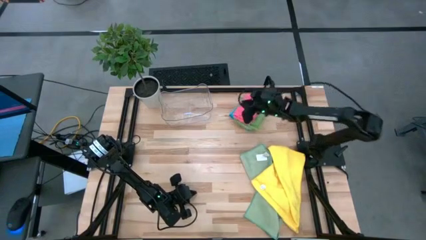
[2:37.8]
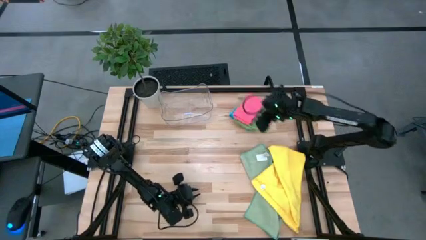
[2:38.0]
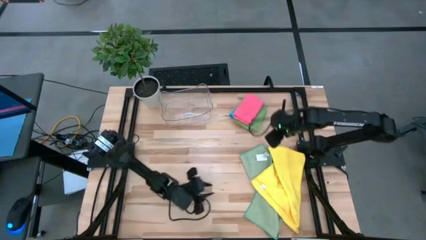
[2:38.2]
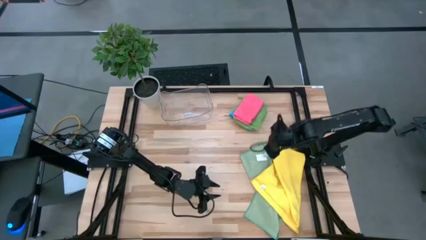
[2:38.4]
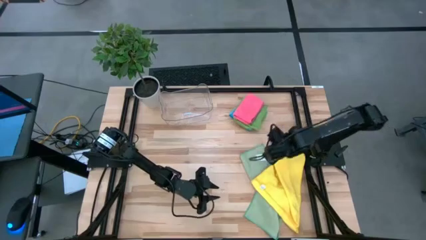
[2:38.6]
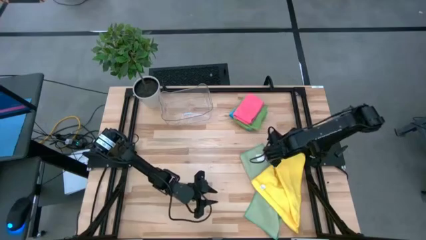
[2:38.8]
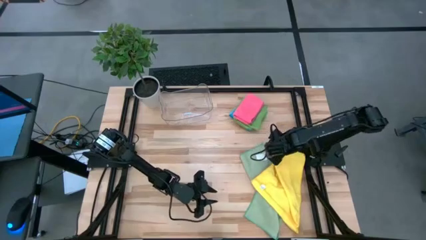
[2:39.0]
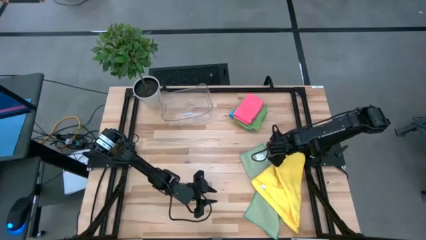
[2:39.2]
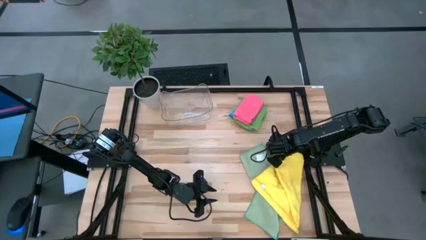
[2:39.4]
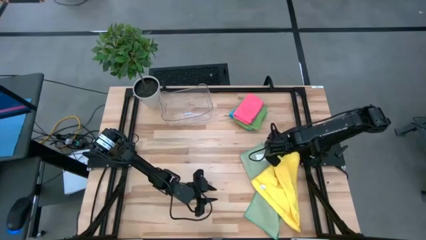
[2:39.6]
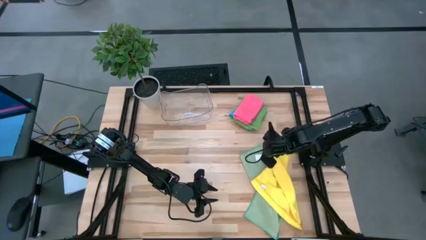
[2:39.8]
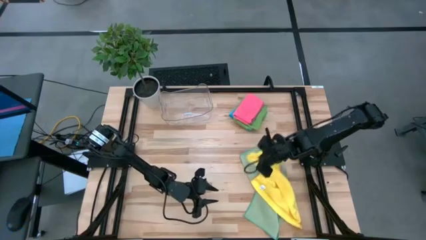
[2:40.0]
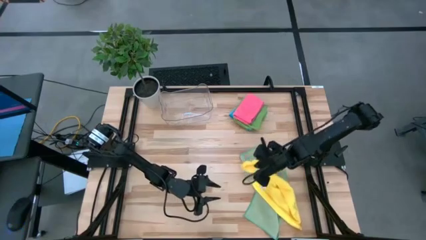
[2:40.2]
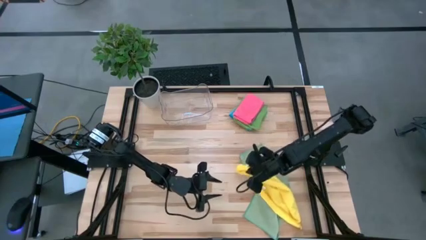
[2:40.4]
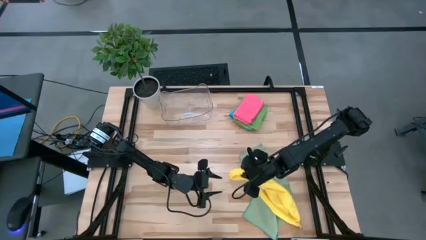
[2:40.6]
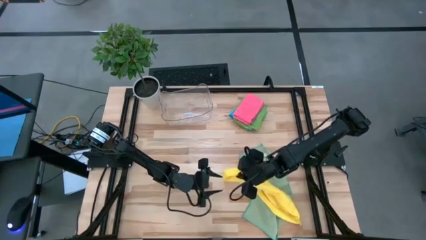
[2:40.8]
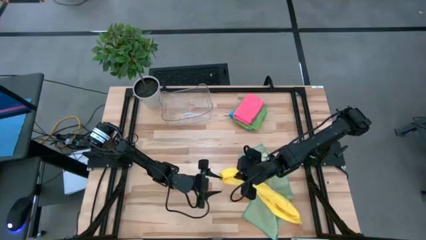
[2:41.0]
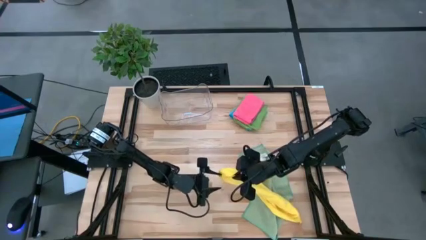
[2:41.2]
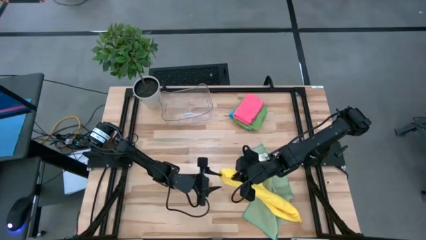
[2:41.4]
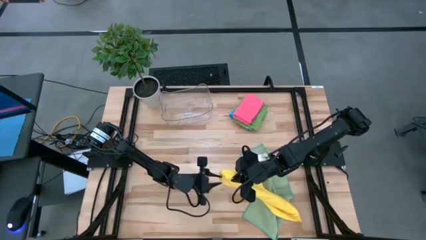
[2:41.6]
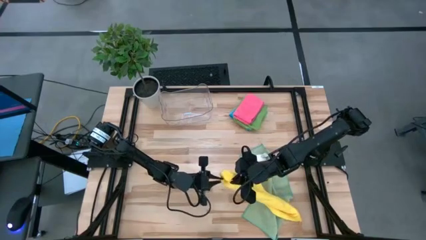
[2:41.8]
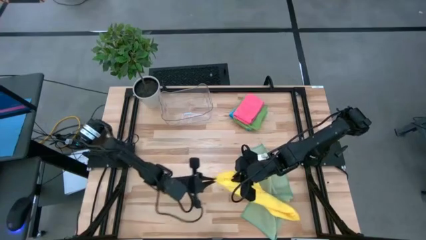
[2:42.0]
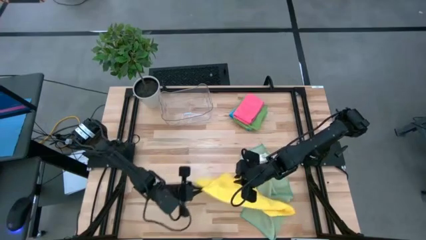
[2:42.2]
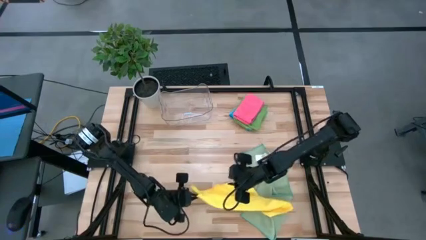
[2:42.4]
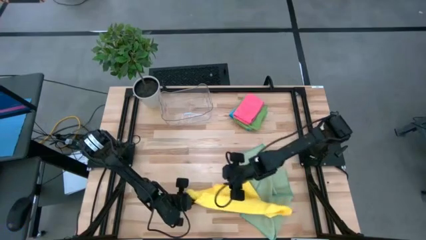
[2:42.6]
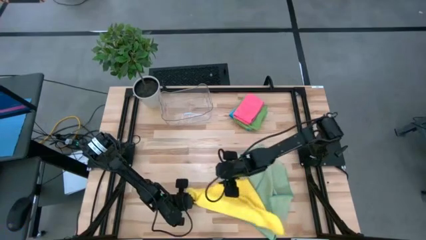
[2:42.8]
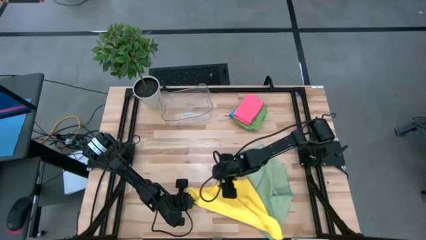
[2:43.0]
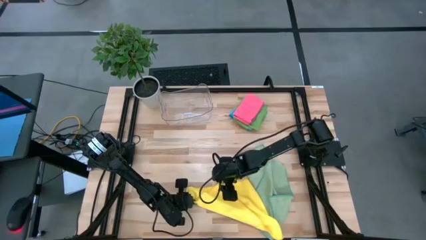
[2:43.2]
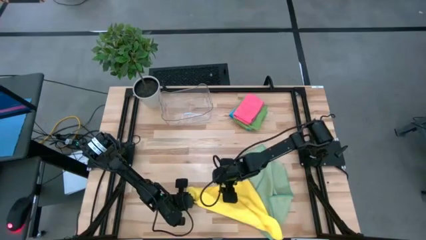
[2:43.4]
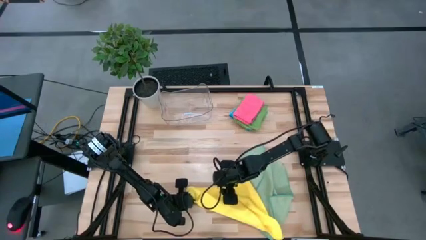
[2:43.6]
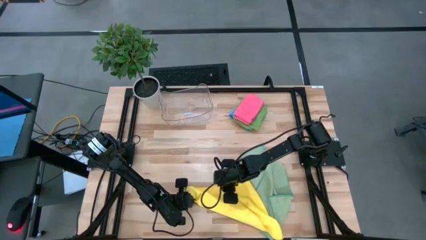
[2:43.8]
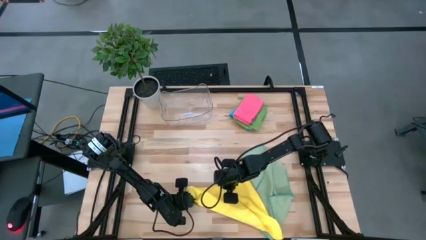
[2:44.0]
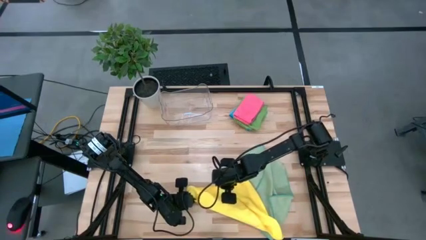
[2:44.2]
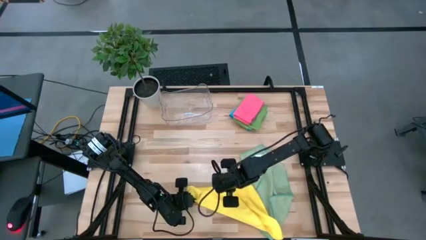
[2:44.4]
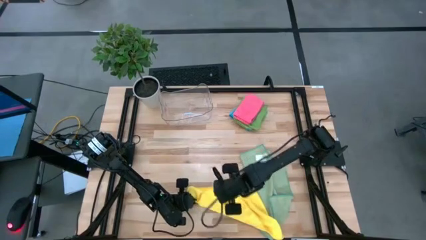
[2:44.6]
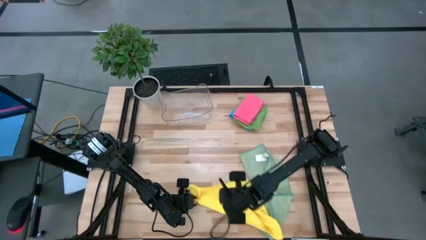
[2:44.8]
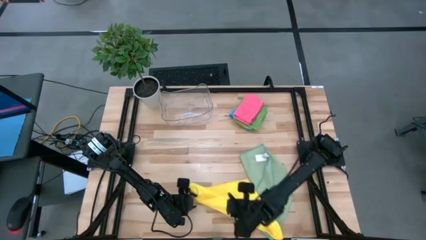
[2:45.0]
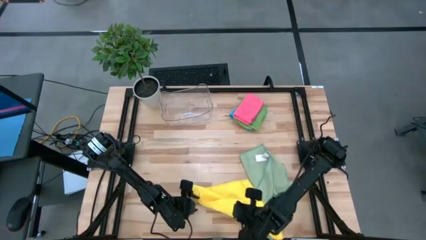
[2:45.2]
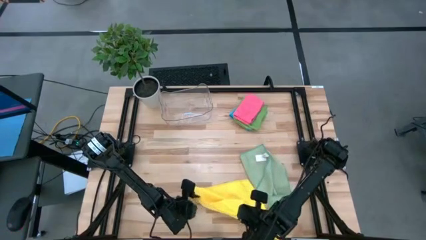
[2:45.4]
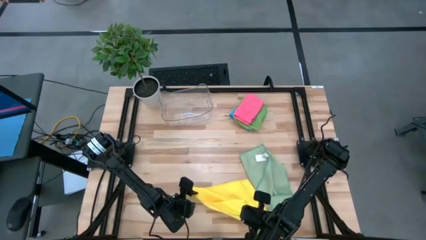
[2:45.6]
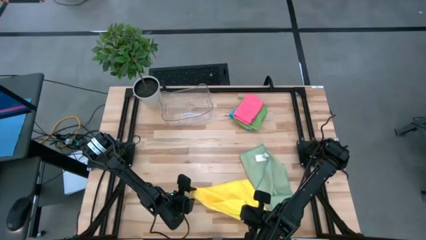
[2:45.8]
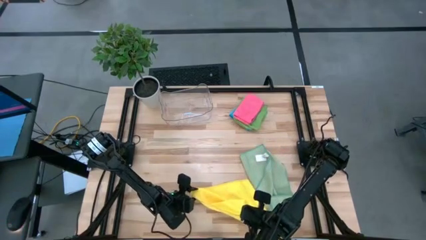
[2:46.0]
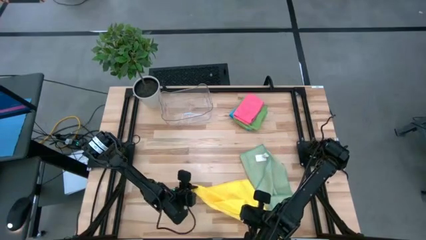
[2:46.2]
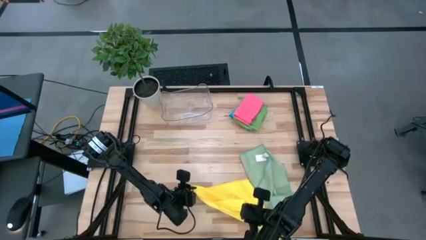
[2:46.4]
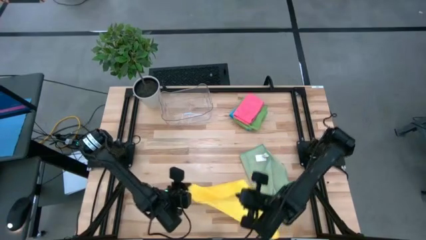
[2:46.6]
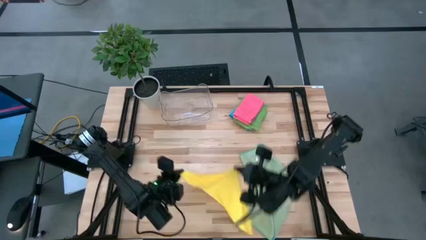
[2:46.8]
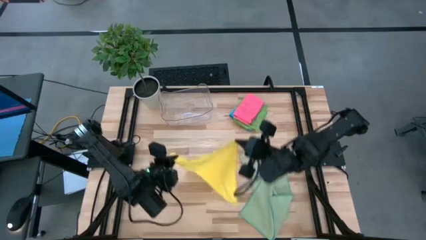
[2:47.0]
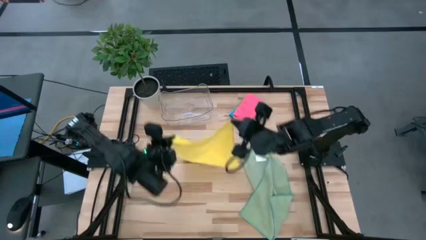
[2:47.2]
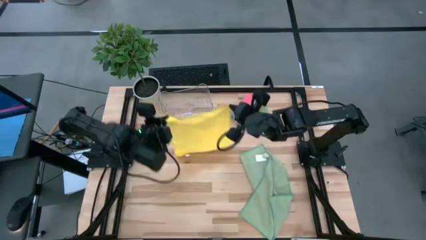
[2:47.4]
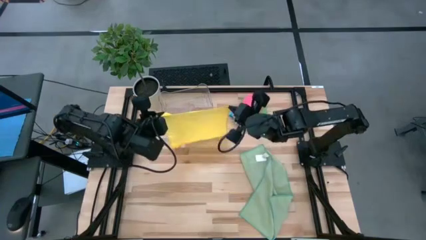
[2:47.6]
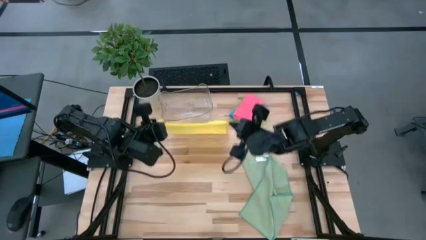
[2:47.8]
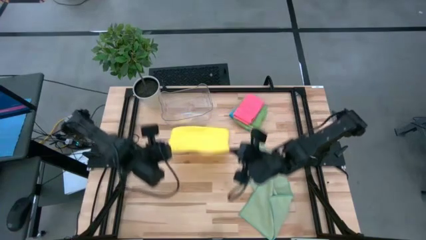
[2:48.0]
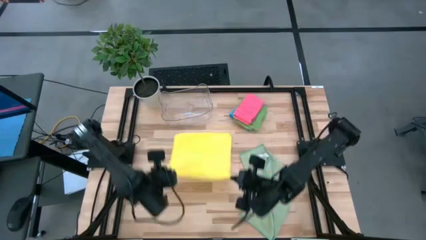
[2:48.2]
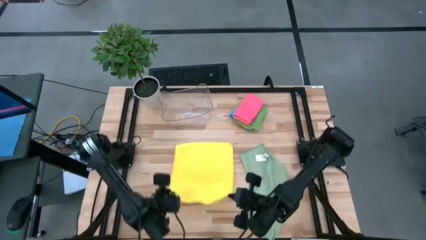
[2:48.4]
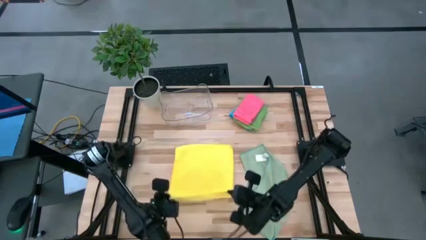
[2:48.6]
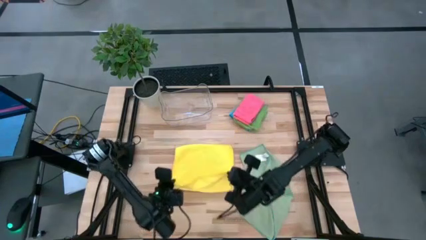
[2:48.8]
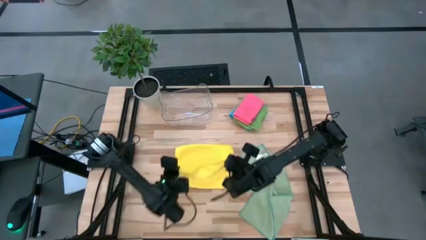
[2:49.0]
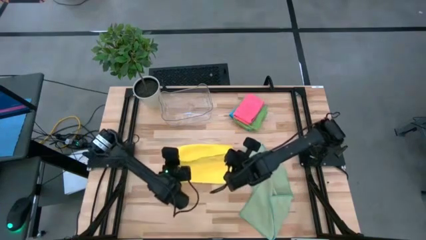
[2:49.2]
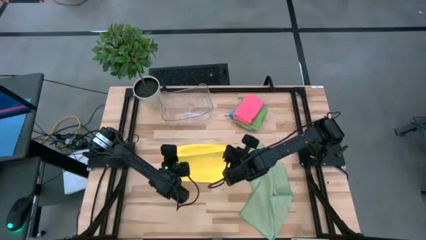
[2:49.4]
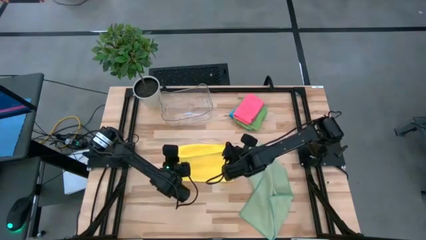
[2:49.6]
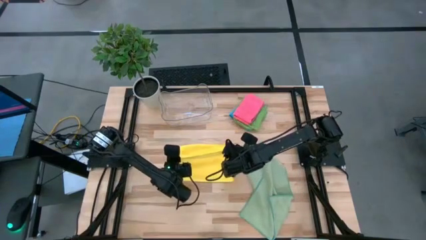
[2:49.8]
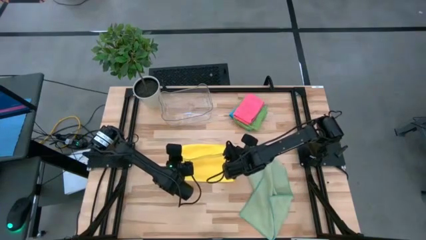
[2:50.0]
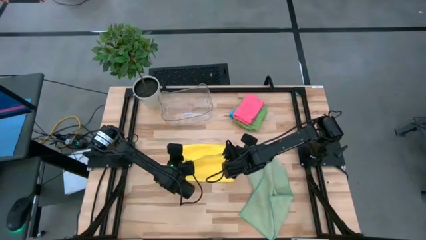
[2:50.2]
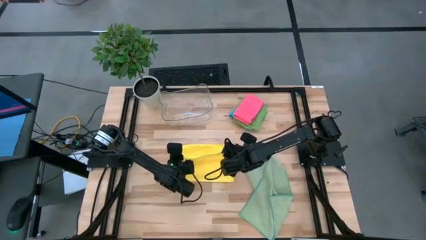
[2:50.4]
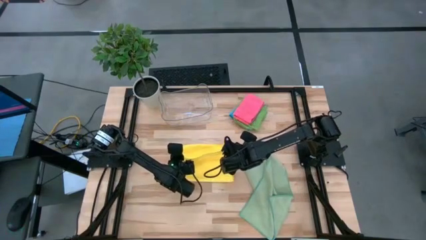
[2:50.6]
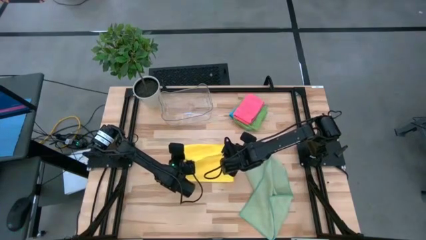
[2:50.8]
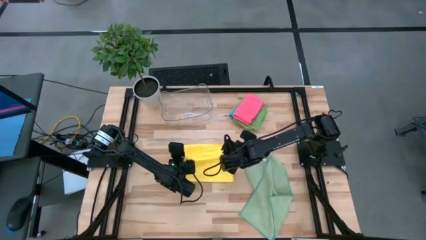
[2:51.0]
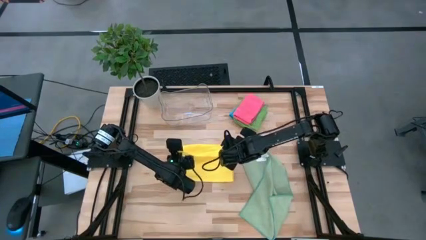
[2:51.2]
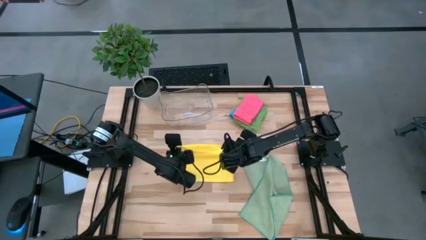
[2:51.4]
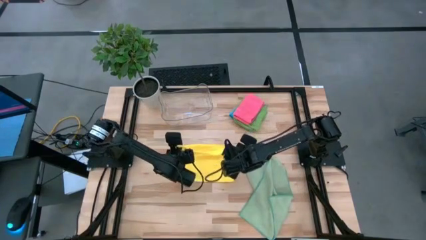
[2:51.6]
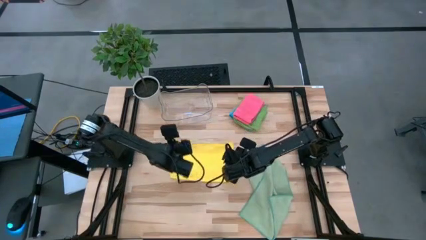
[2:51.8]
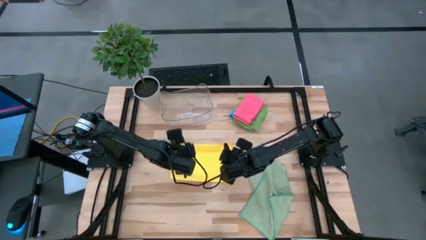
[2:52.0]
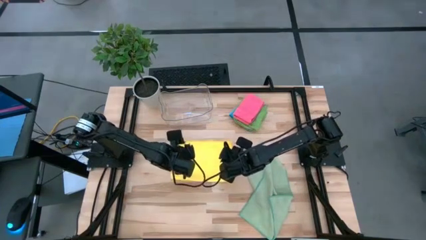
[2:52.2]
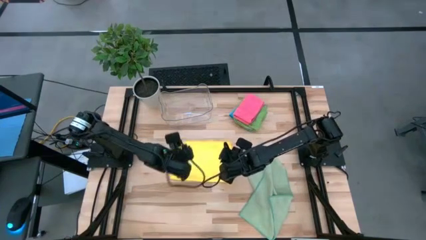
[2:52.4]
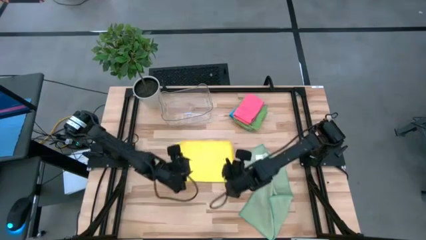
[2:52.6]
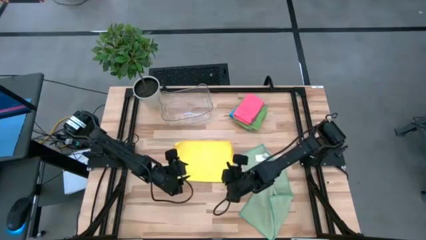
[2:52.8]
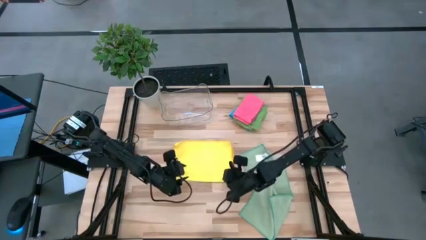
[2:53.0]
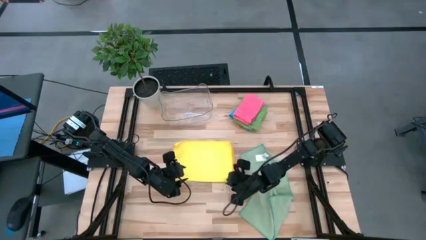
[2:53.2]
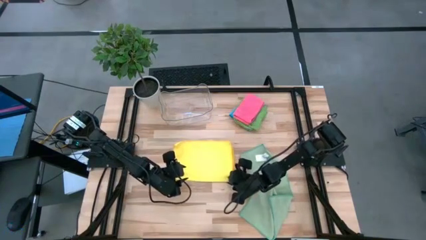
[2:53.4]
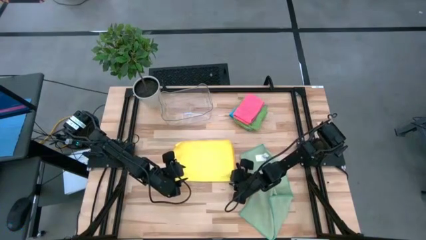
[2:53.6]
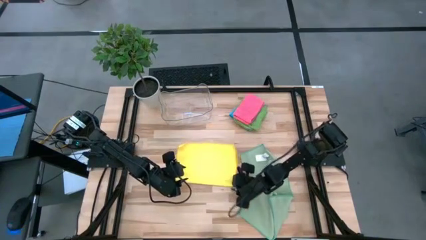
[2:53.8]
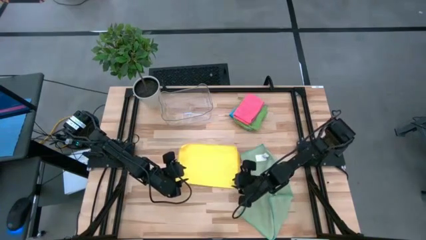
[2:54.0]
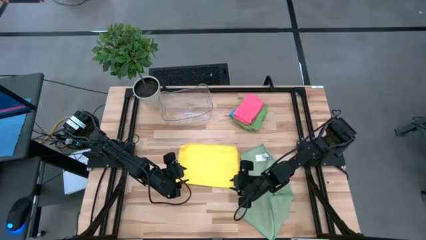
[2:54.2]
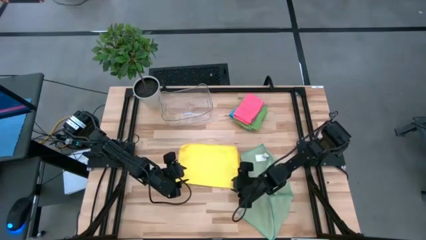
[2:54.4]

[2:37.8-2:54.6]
Task: Fold microfiber towels
Fold the yellow microfiber cloth

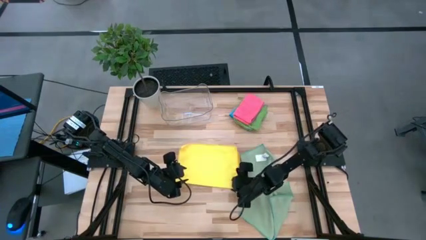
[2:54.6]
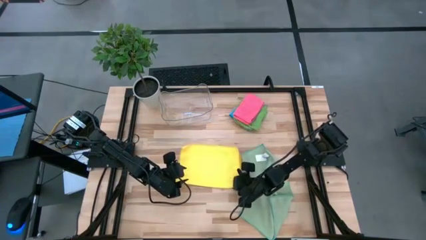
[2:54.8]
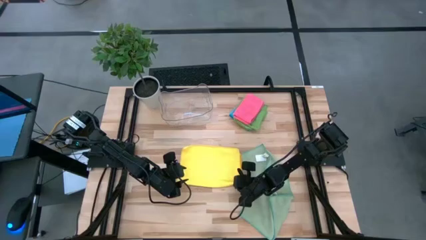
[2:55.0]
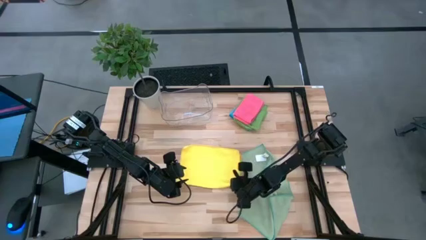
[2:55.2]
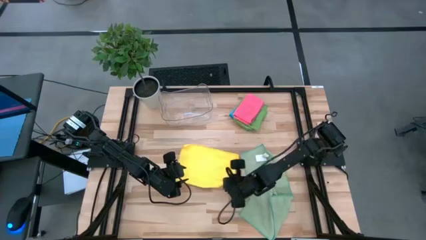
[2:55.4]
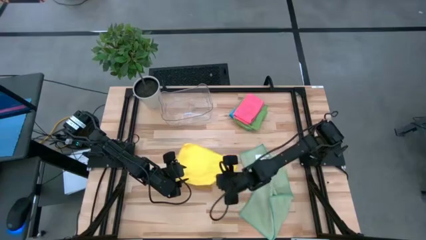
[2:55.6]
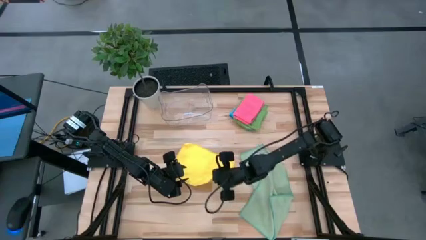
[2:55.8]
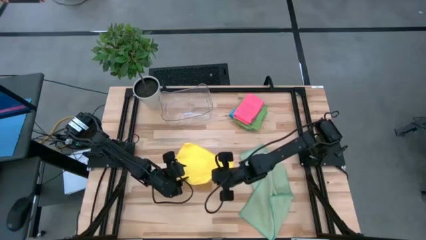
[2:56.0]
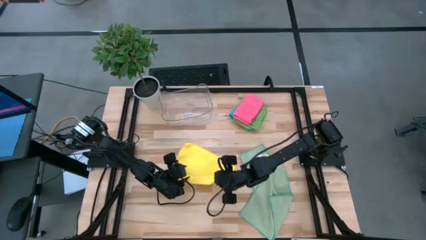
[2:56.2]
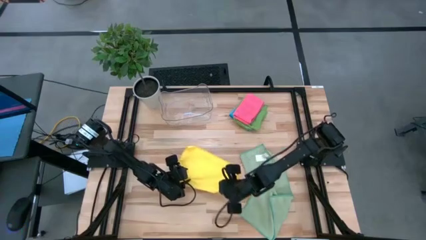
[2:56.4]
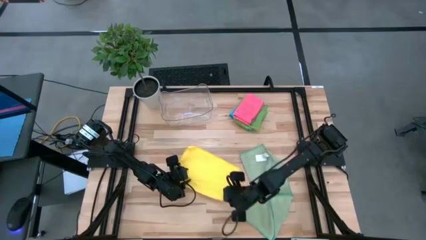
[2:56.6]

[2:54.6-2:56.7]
Fold the yellow microfiber cloth
